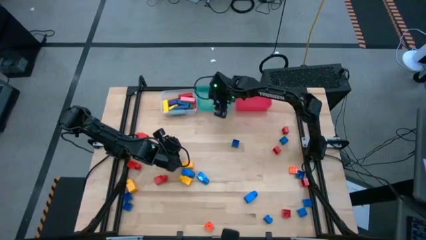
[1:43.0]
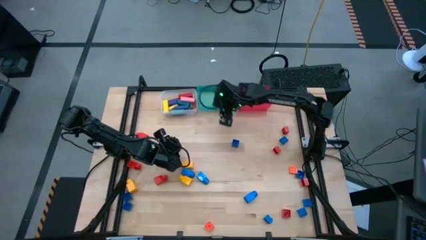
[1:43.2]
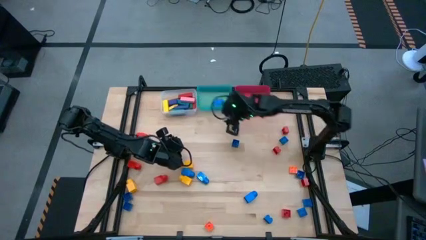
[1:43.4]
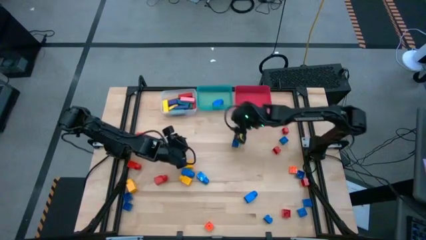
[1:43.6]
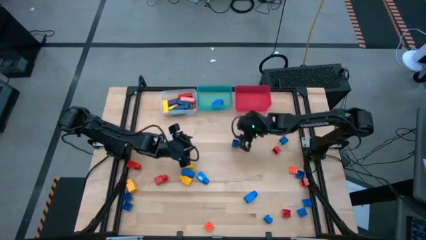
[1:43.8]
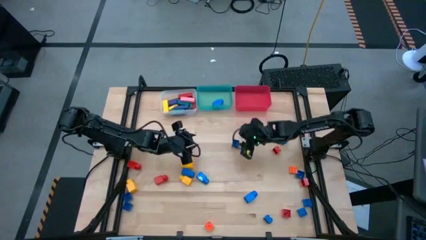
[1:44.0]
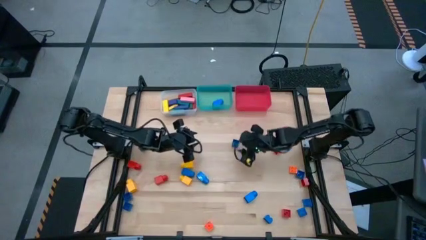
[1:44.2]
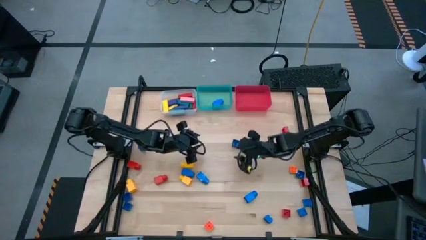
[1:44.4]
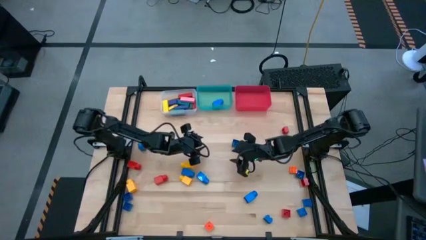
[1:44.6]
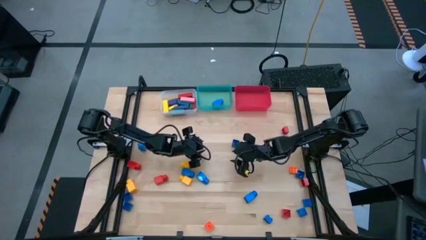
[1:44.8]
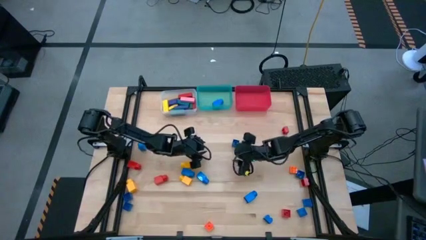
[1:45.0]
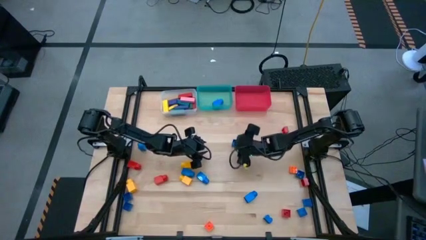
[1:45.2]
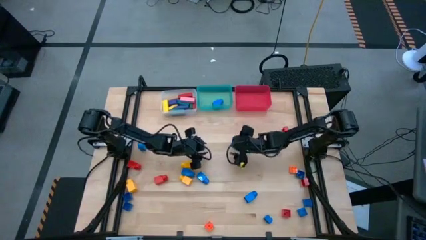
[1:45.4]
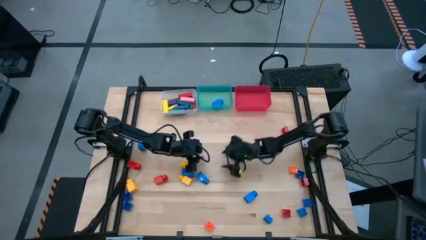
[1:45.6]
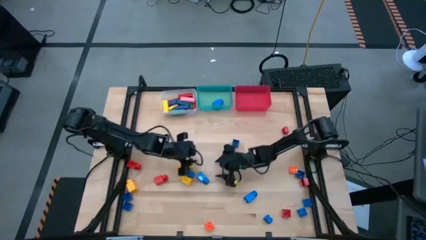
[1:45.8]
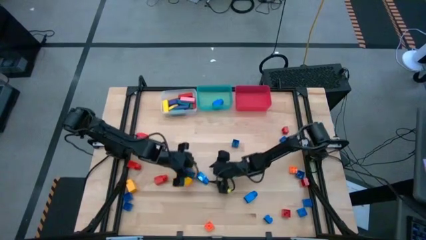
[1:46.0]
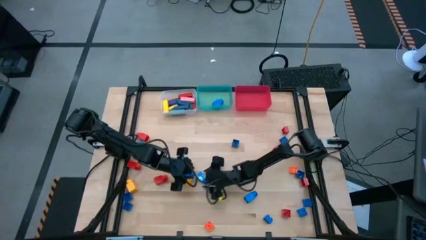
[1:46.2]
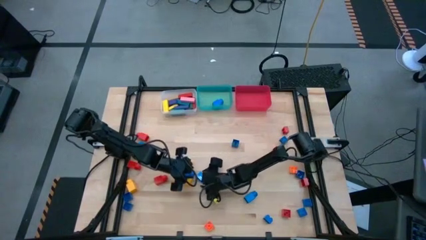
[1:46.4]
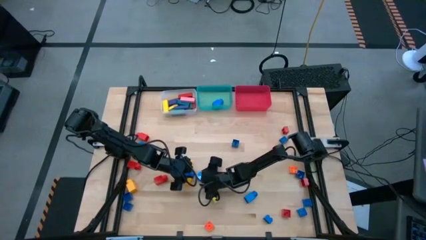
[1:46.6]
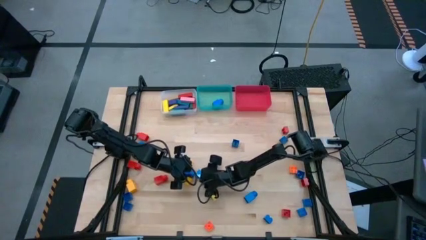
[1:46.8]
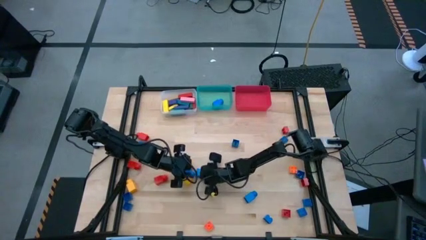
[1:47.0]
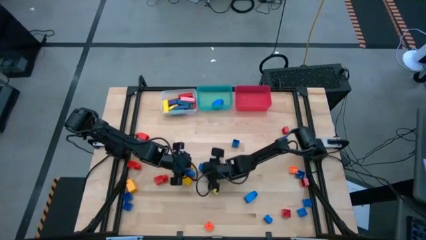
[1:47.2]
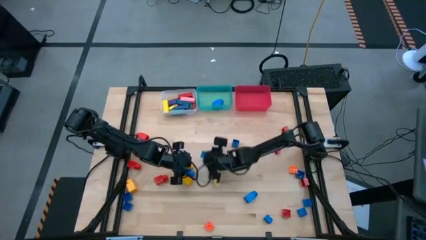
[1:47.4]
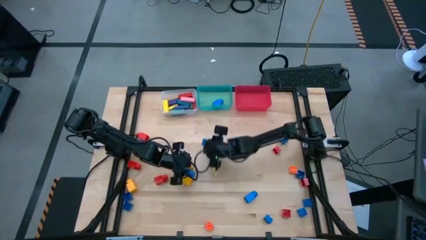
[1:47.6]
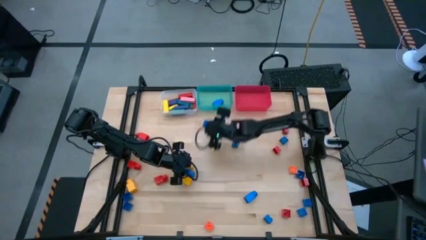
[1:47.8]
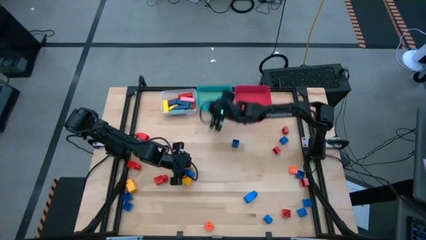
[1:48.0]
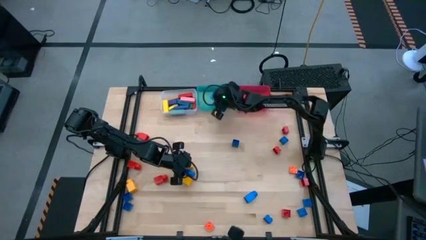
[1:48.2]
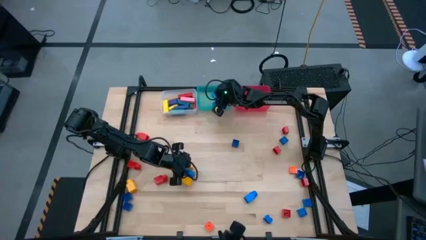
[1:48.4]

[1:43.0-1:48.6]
Task: Sort blocks by size
Put the blue 1 stud game piece into the green bin

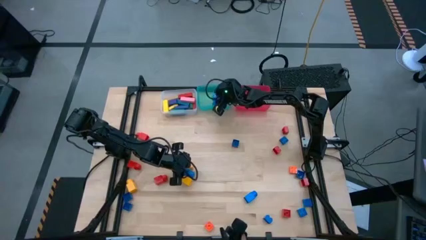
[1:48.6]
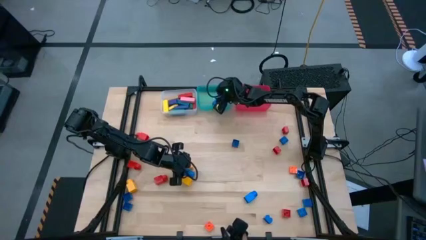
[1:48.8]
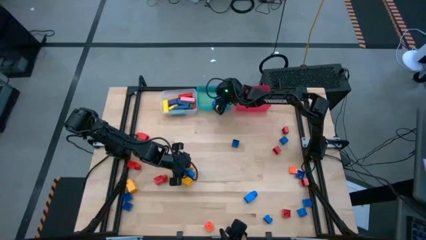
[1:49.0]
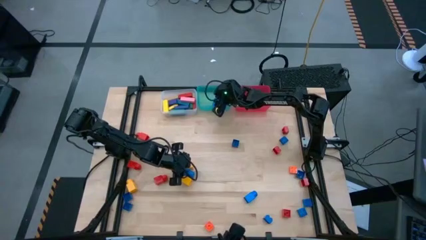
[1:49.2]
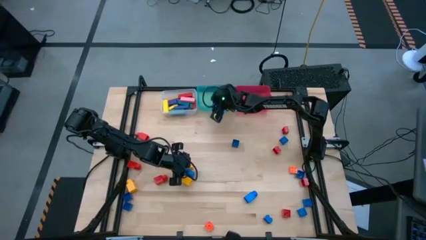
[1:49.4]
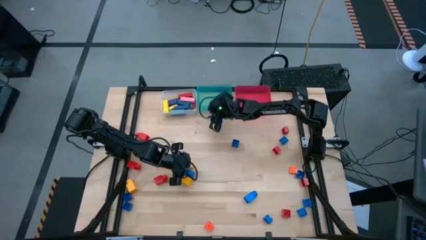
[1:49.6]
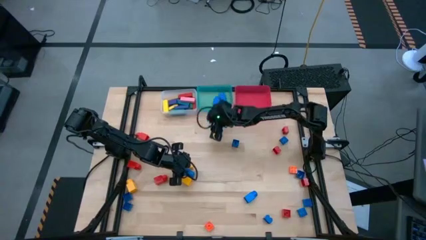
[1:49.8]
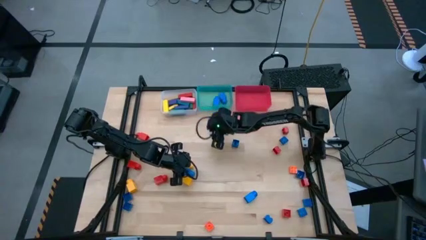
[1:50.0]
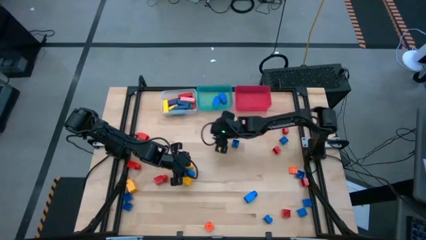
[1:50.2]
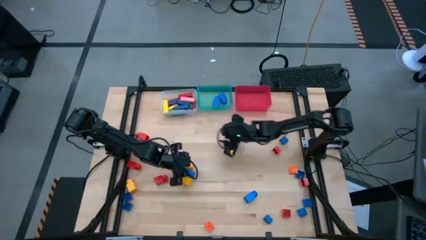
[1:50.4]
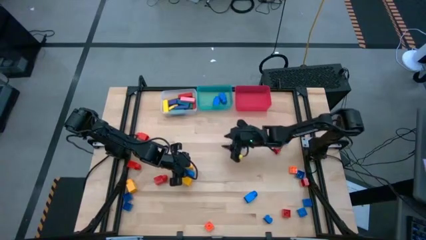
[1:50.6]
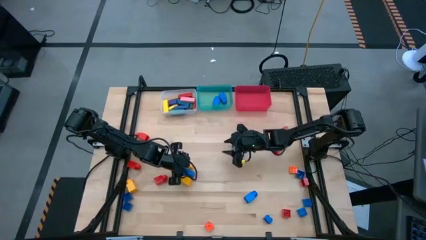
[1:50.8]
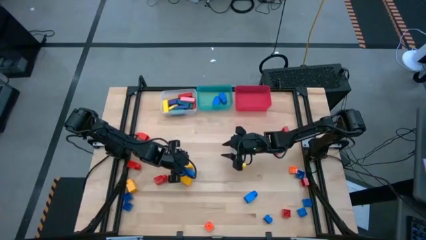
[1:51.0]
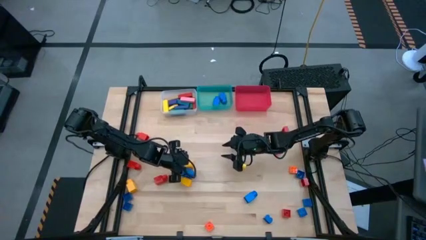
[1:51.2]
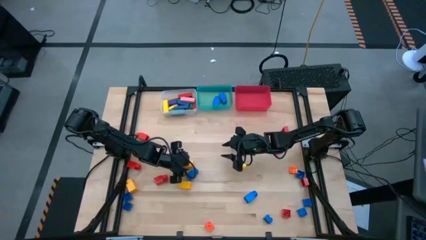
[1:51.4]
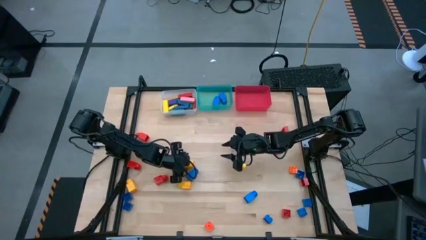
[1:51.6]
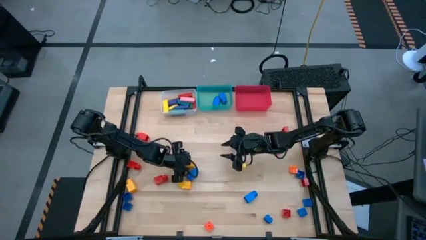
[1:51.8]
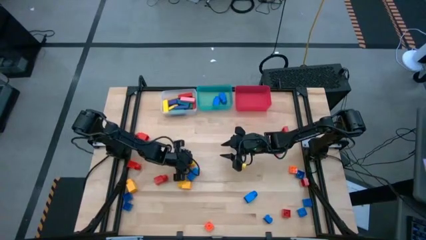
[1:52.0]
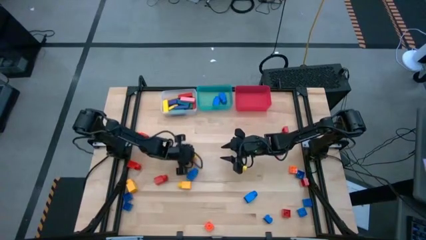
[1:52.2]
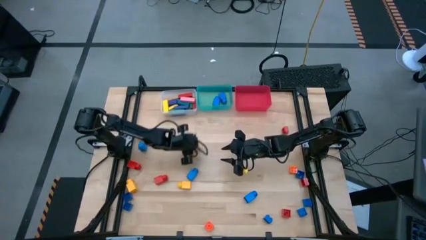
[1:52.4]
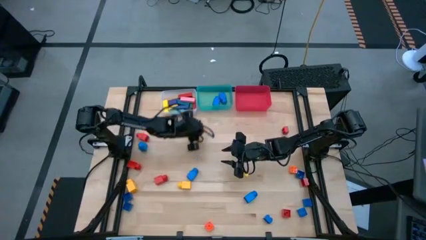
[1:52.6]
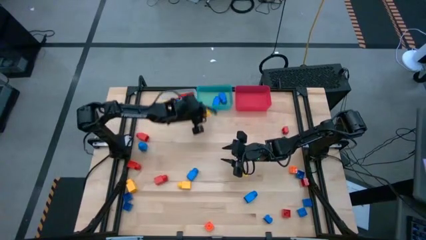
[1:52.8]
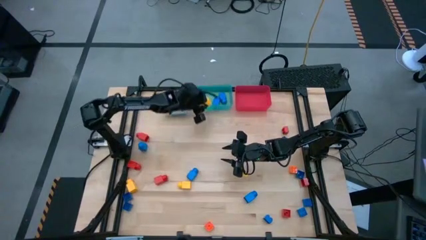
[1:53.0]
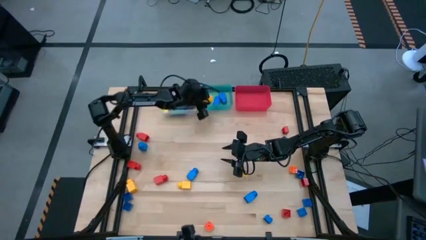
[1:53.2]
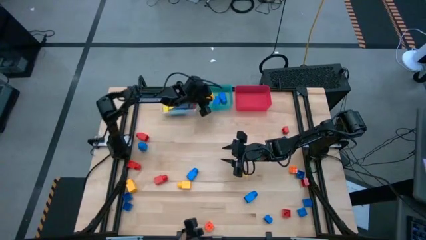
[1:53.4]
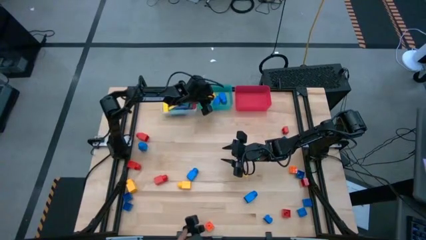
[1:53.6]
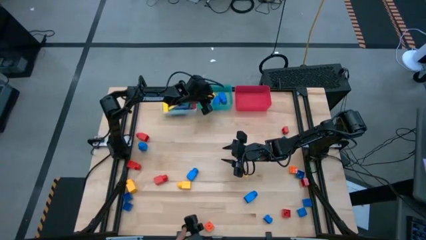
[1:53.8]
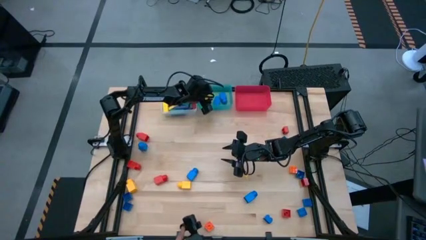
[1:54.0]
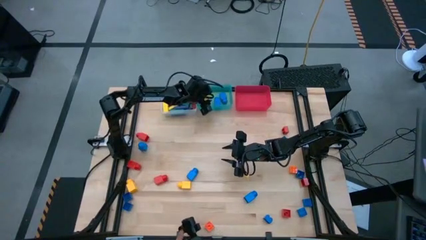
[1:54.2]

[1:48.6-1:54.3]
Put the yellow 1 stud game piece into the green bin

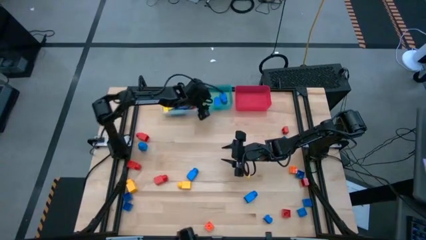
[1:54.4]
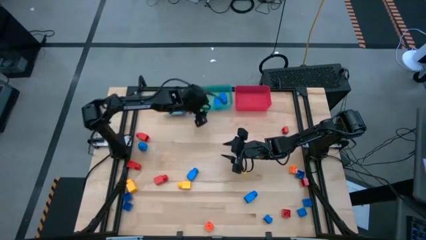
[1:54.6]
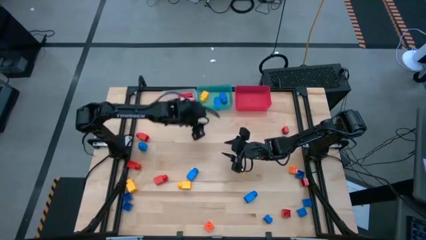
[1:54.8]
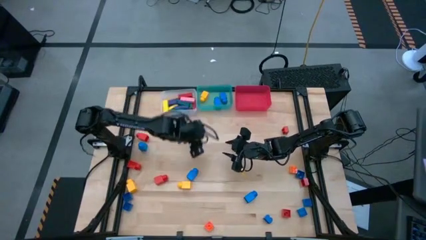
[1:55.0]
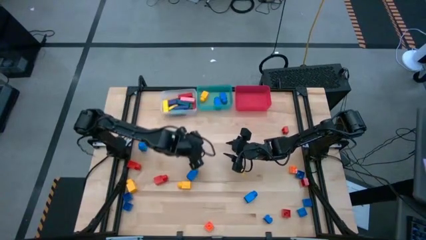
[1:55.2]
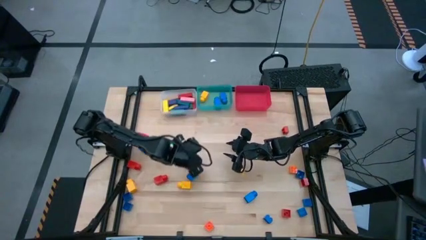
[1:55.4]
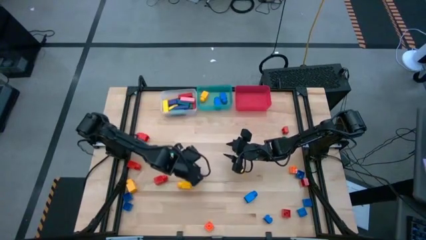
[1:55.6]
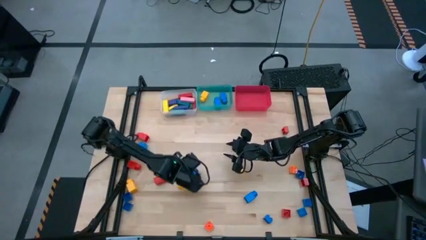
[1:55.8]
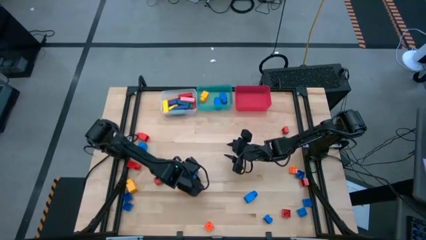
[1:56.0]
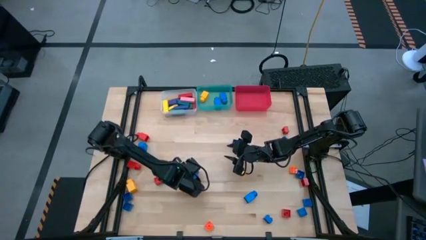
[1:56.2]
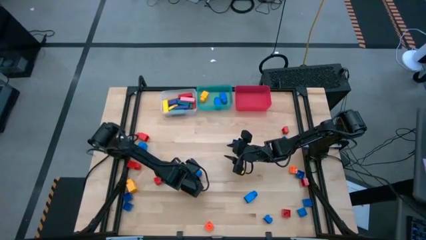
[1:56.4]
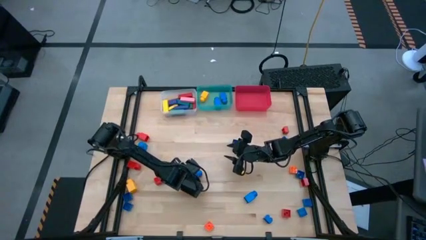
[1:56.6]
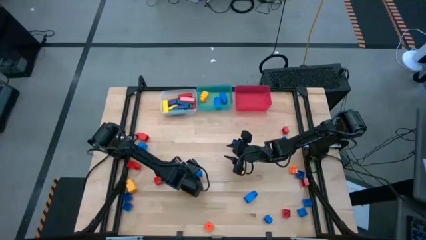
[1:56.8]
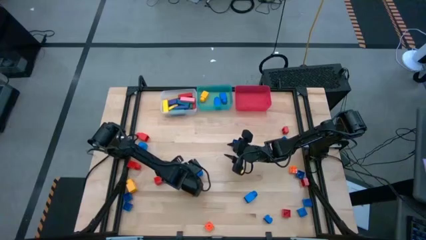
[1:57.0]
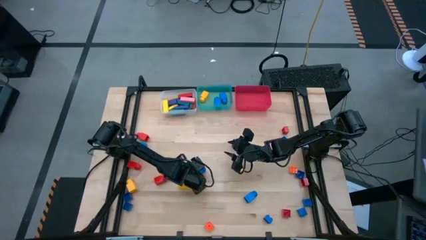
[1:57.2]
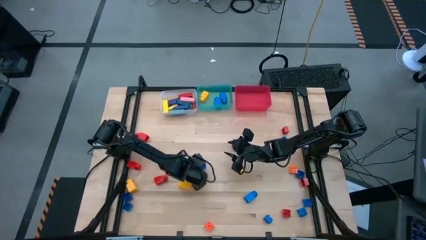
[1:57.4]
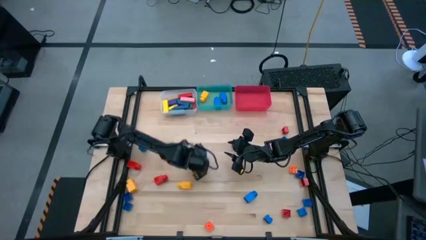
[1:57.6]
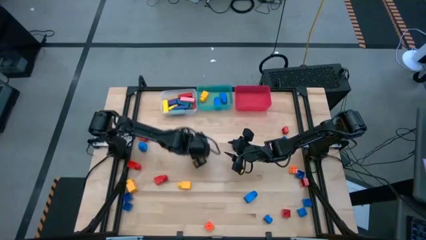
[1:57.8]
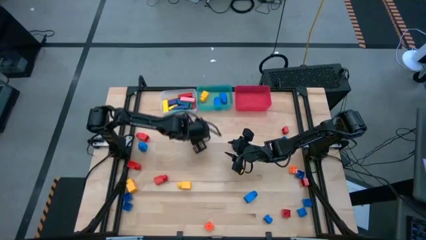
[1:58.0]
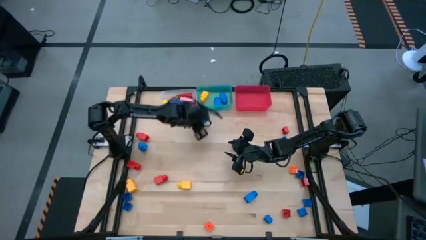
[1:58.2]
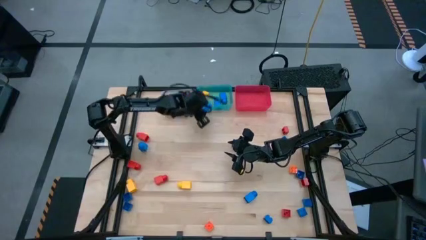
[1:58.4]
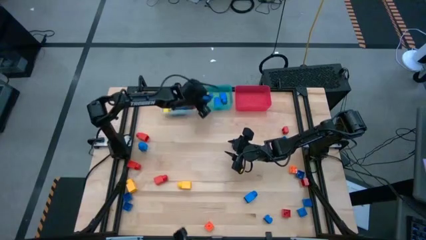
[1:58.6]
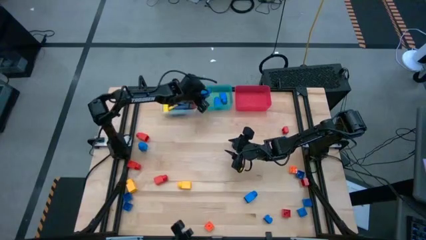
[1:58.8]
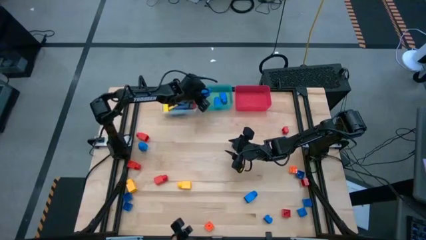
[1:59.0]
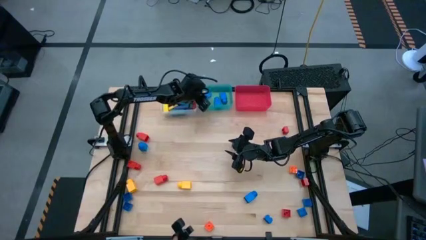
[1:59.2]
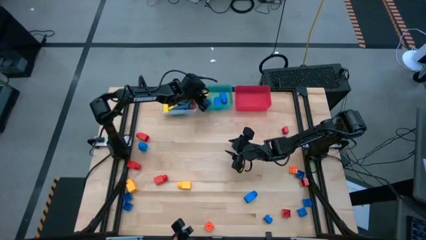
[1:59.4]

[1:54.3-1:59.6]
Put the blue 1 stud game piece into the green bin

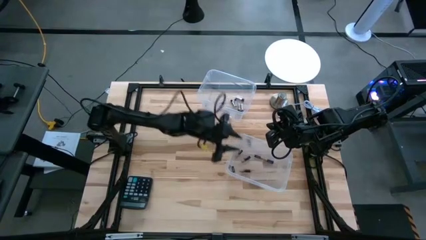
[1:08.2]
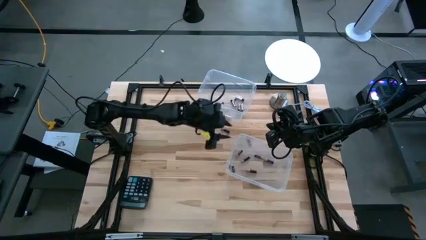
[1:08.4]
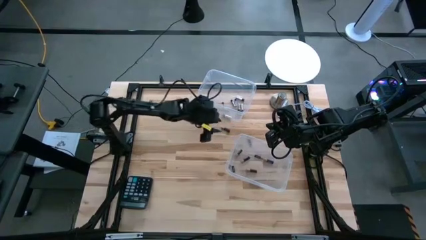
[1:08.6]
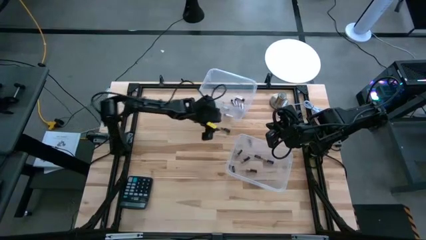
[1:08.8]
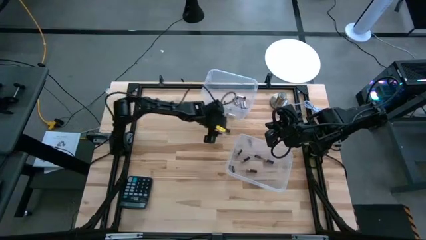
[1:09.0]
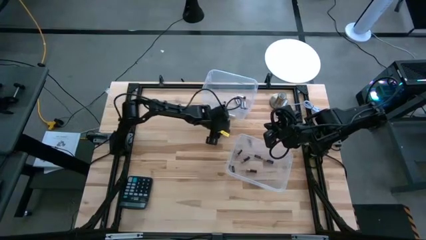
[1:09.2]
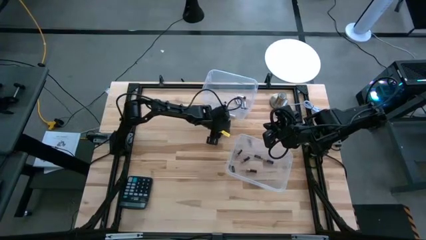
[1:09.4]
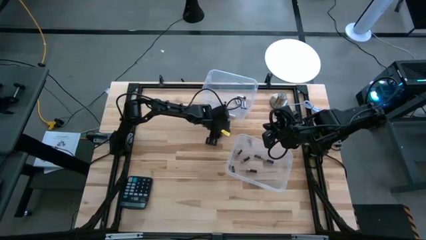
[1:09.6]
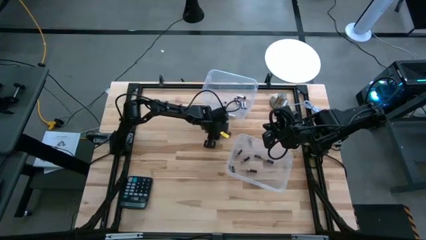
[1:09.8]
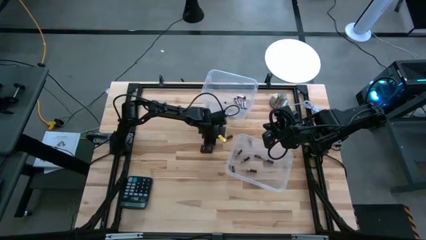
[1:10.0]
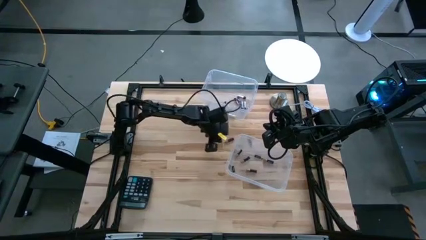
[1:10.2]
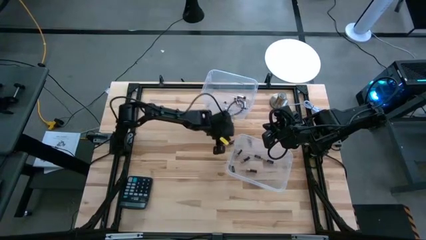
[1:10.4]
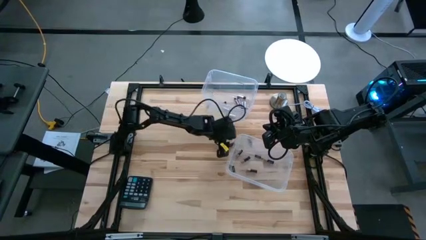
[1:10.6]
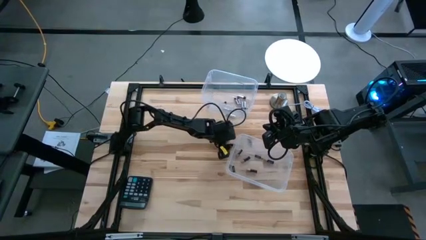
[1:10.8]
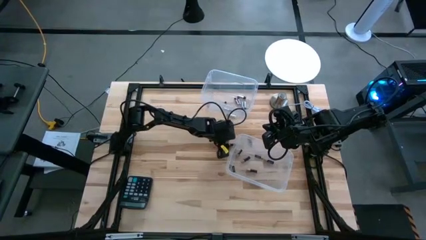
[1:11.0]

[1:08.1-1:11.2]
Task: Sort batteries
Put the black battery into the bottom transparent bin
